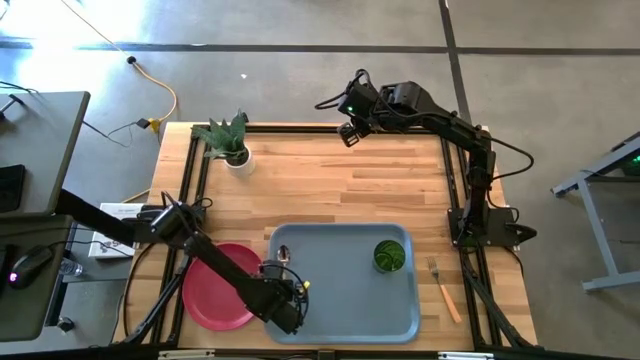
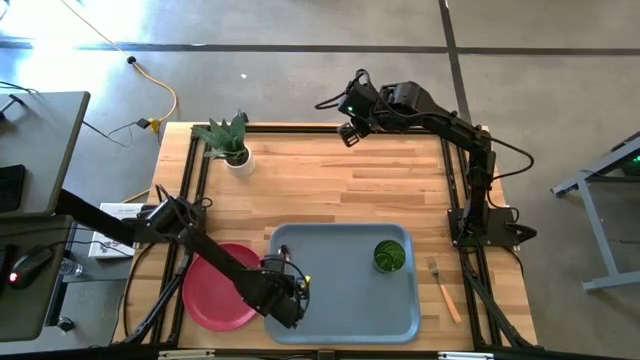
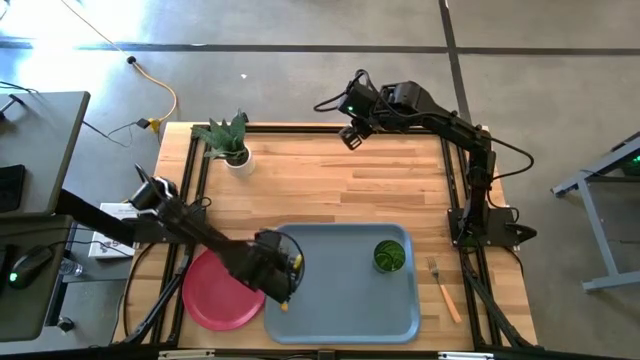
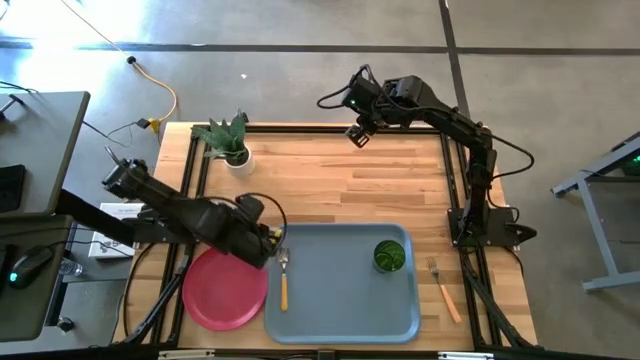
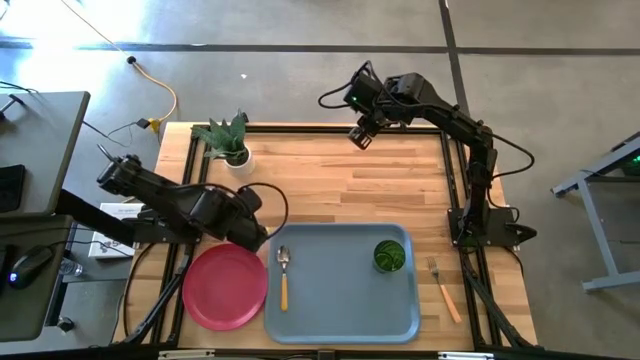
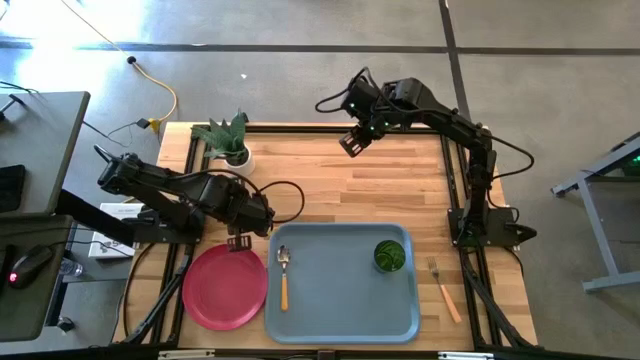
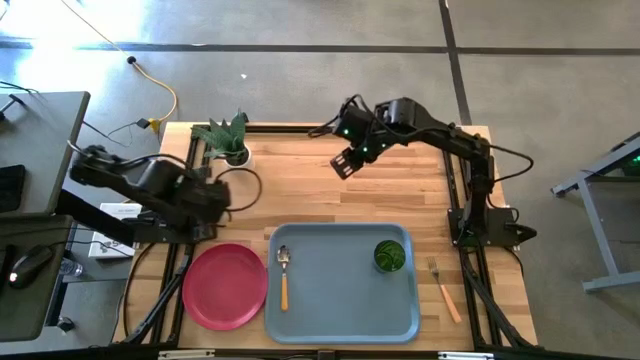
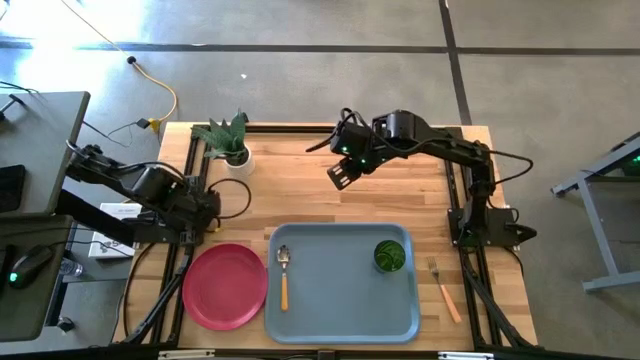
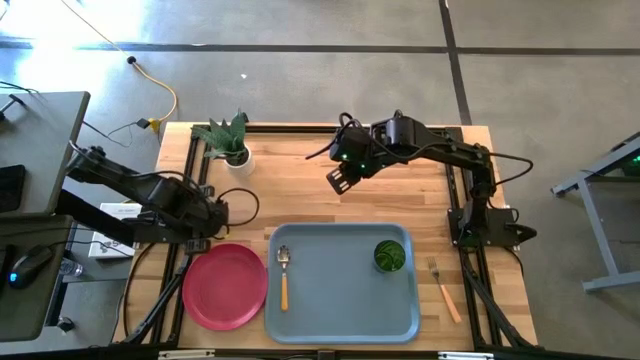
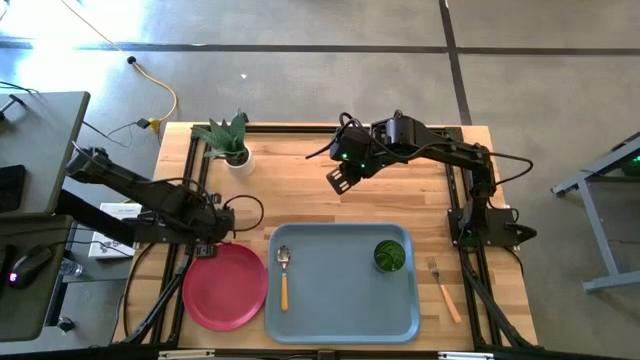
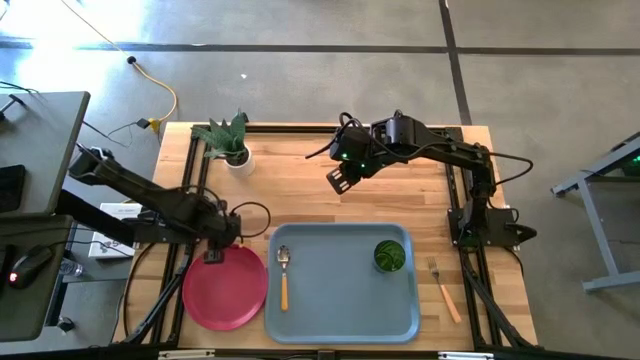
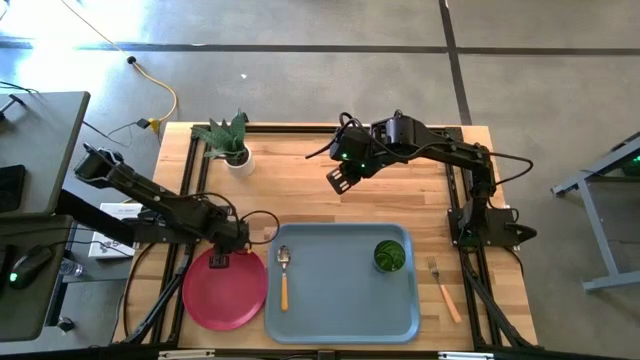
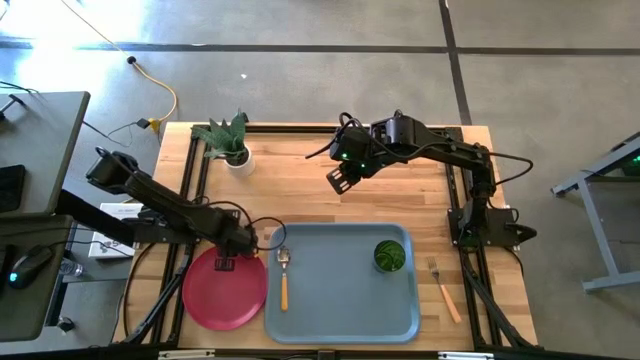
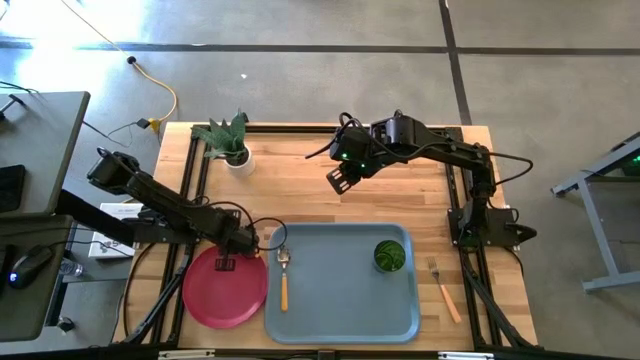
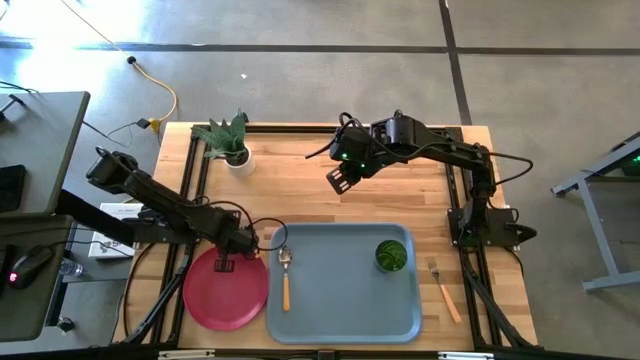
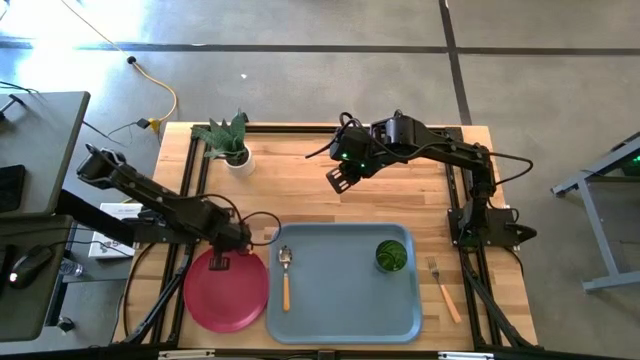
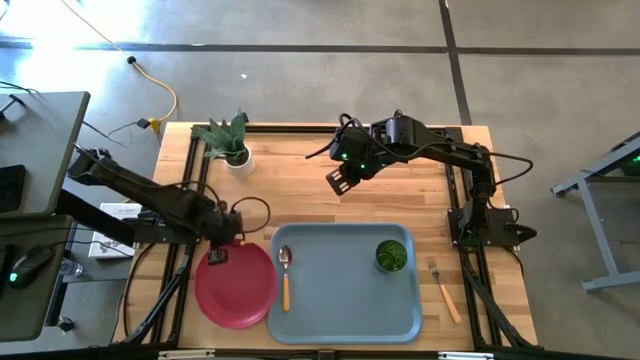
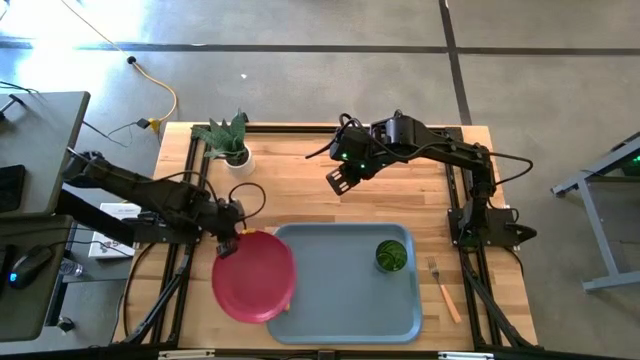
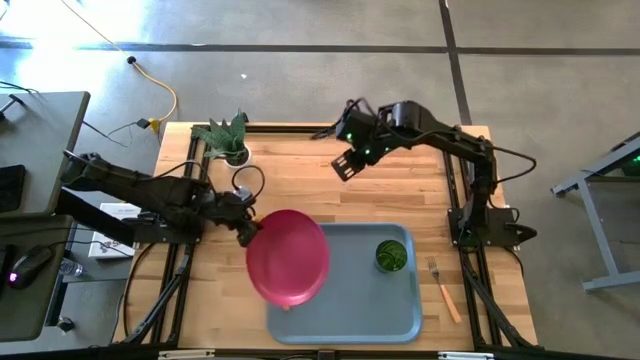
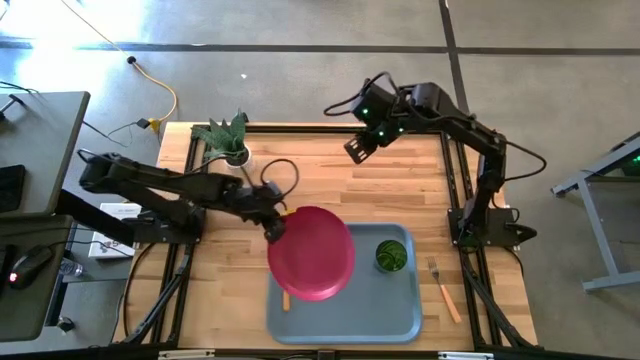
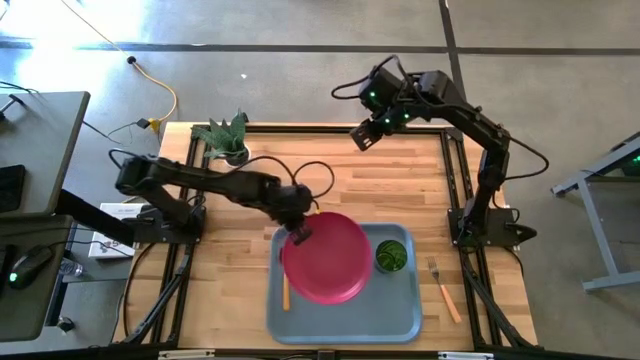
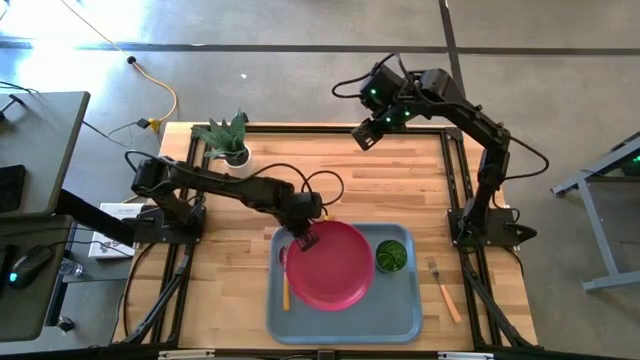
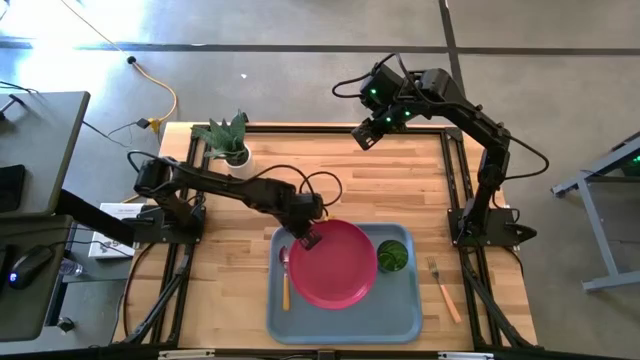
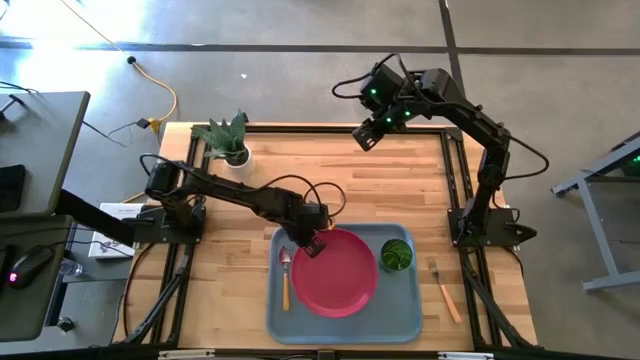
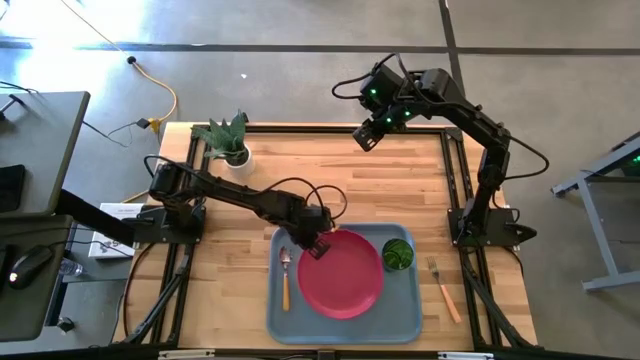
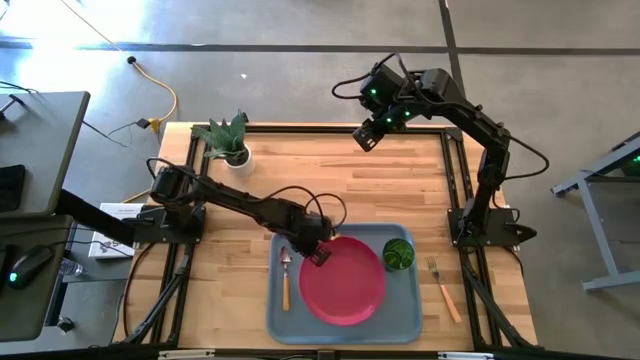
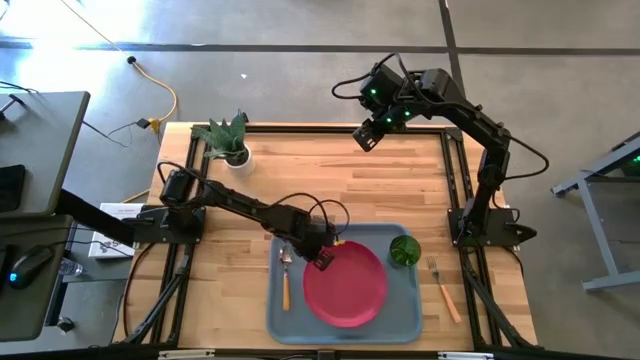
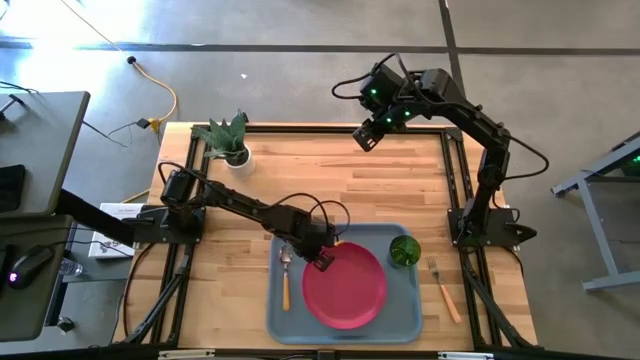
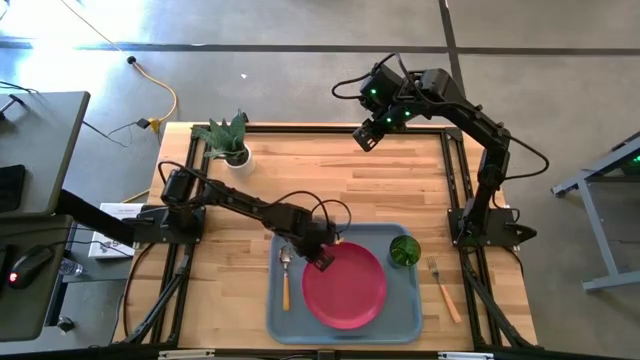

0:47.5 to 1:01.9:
Task: Pick and place plate/cup/fork/spoon on tray
Put the pink plate on the blue tray

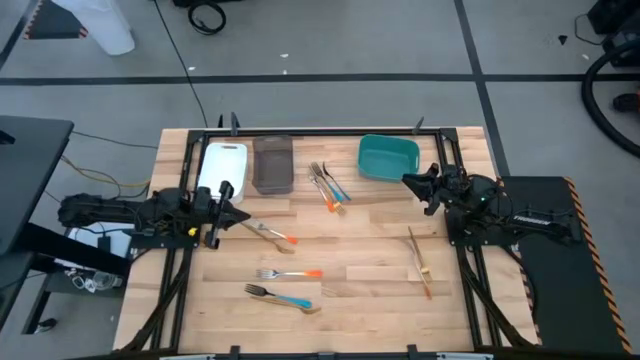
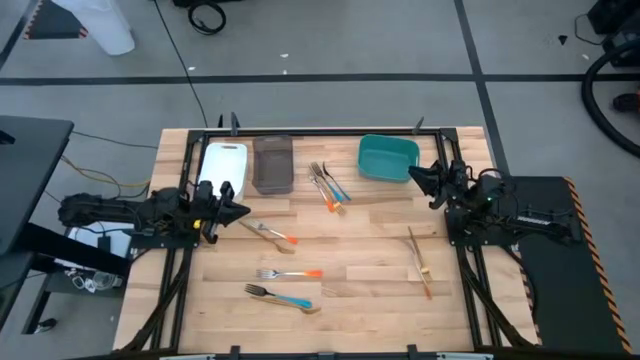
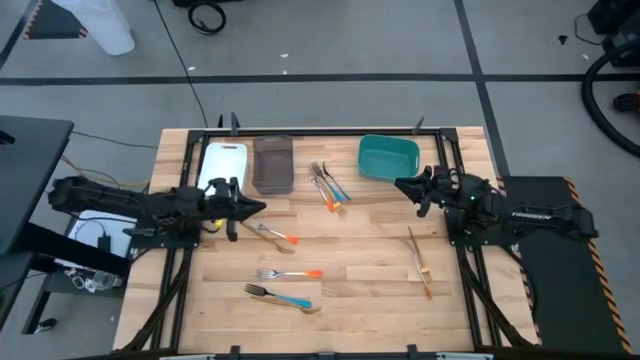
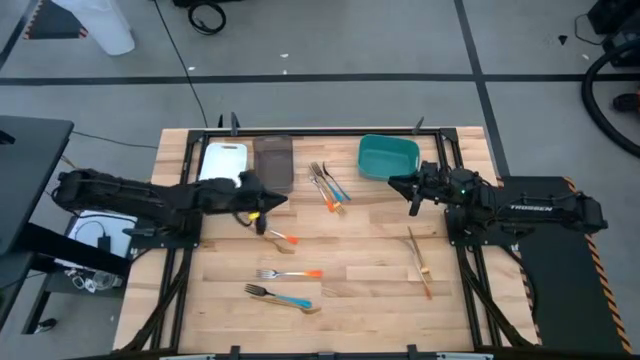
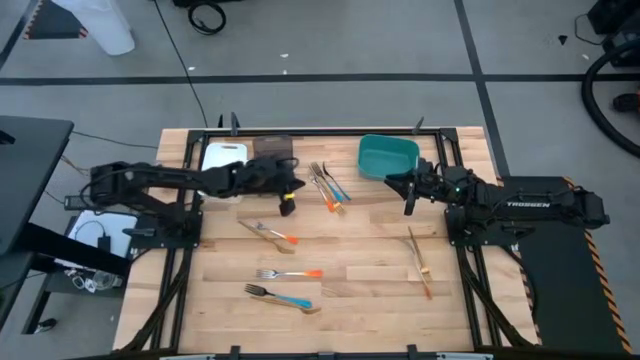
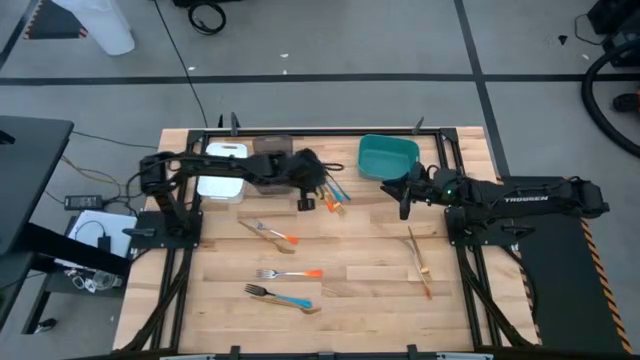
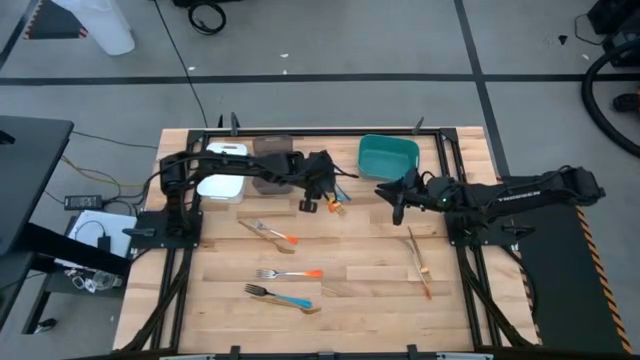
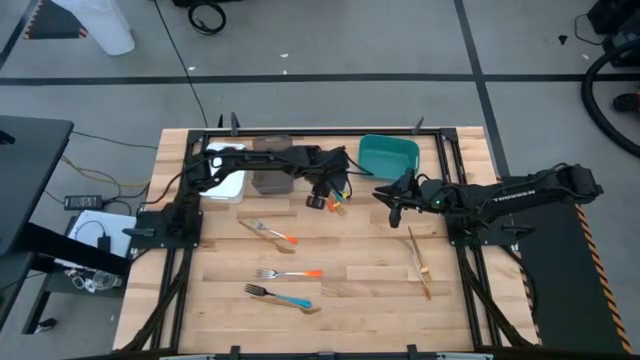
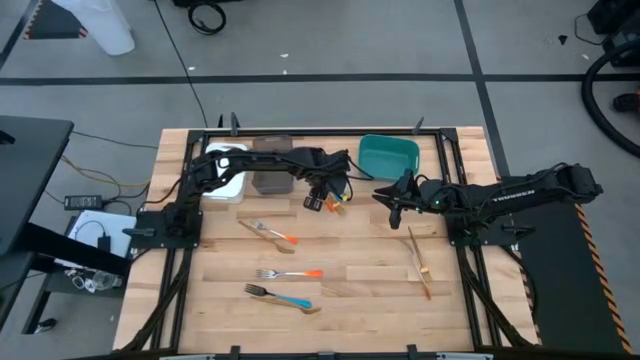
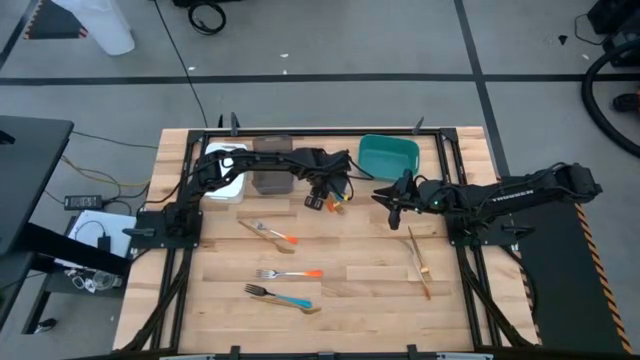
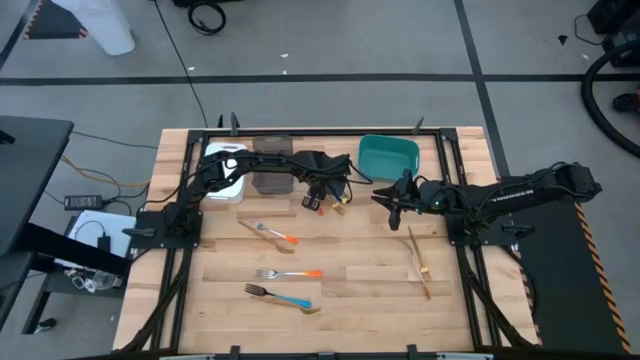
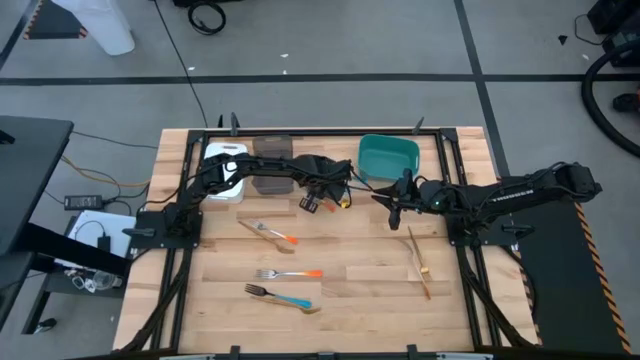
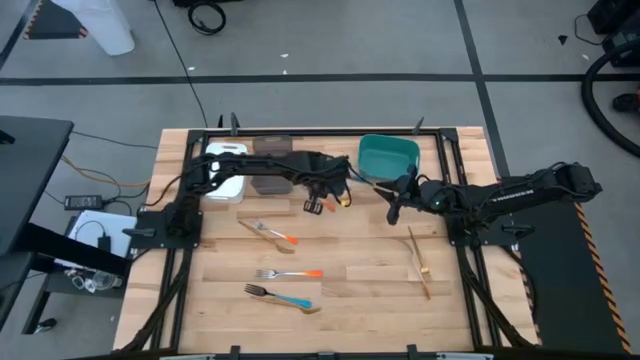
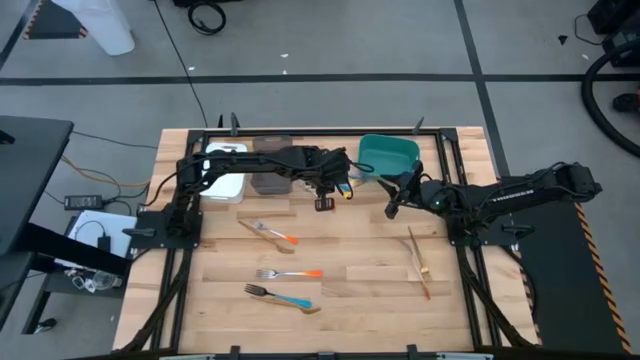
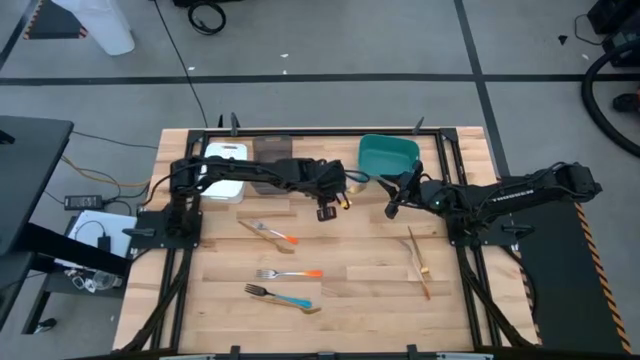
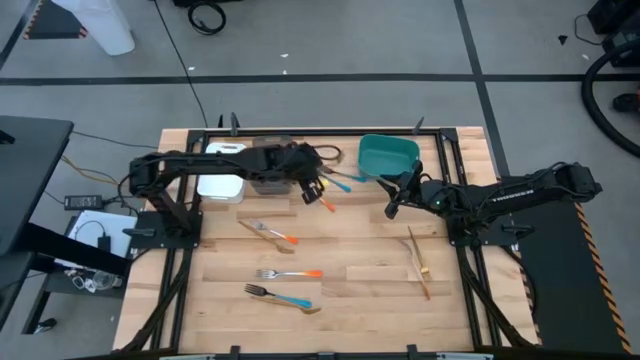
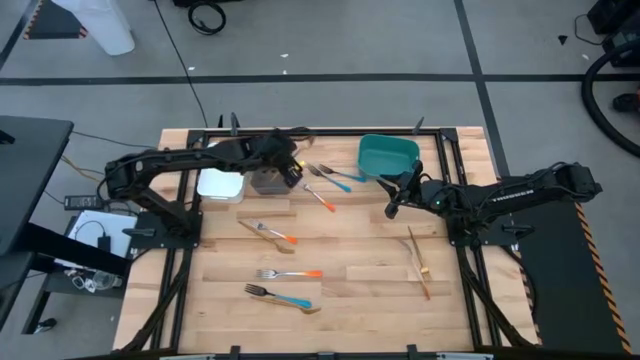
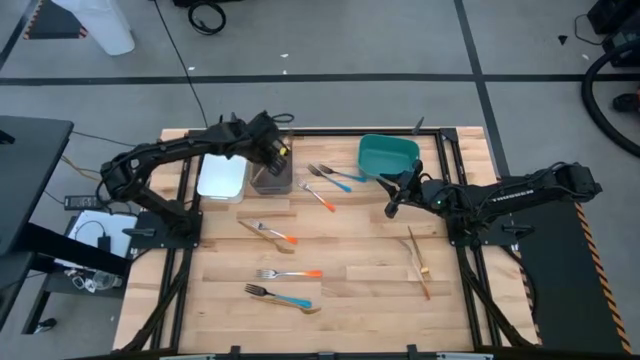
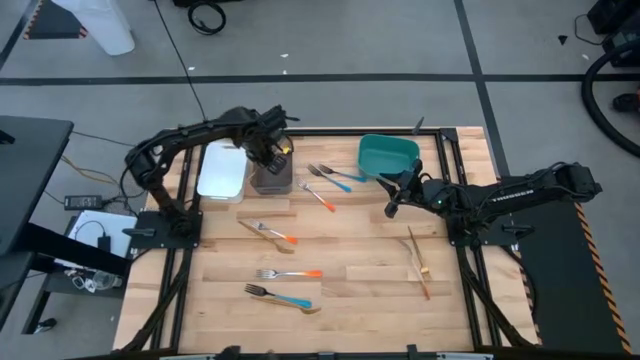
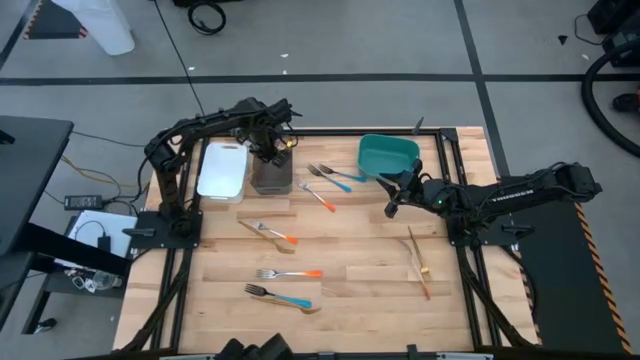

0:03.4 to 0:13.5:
Task: Sort silverware by color (type)
Put the top gold fork into the black bin
